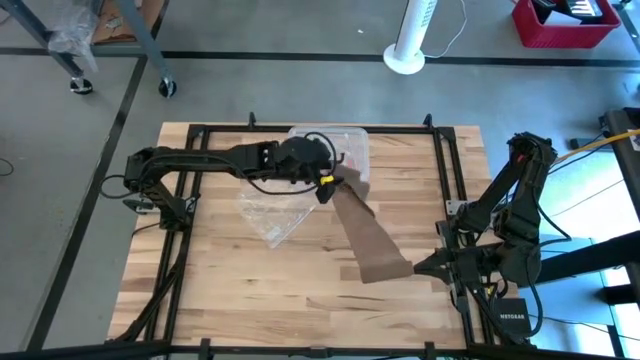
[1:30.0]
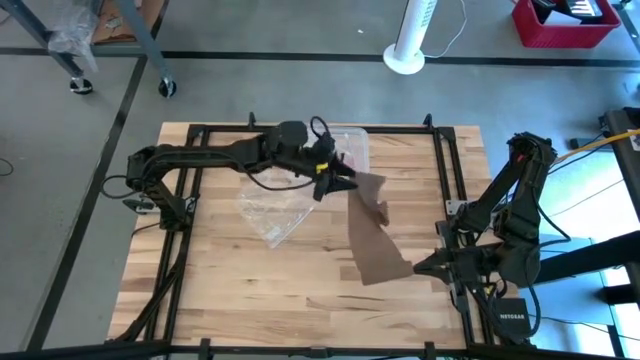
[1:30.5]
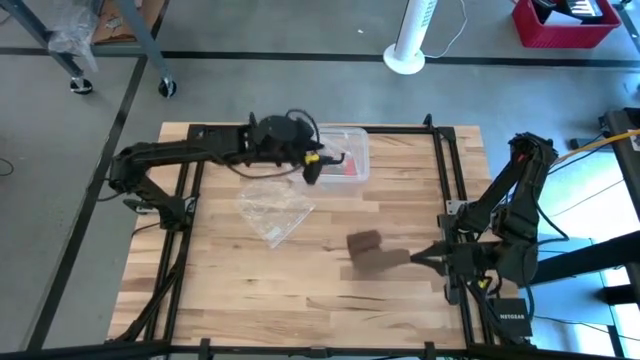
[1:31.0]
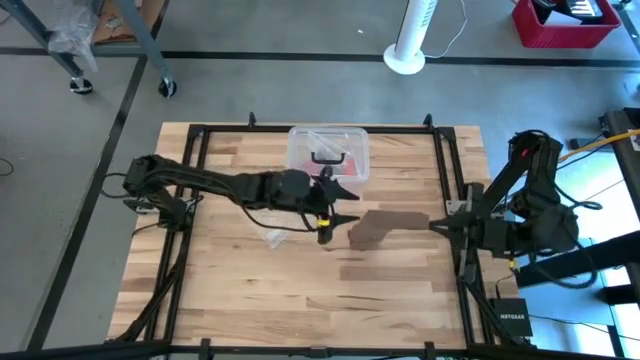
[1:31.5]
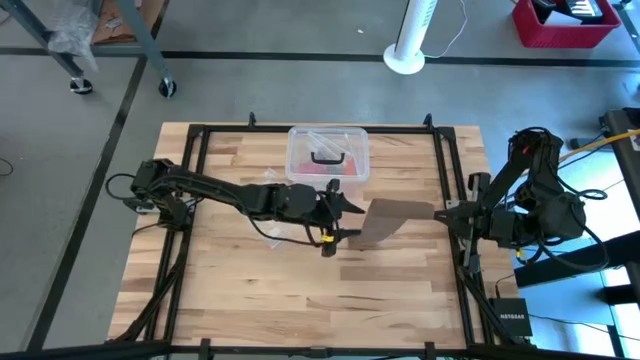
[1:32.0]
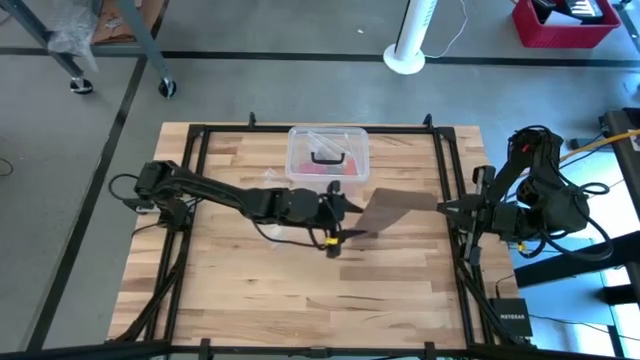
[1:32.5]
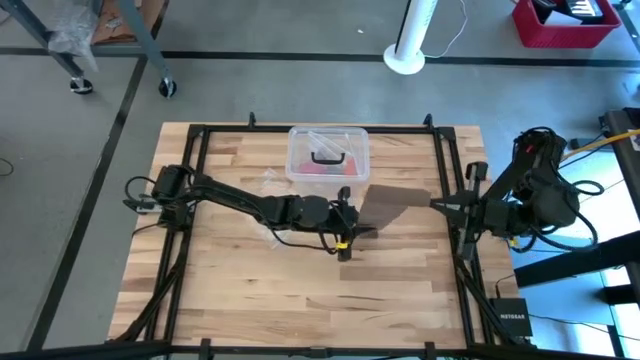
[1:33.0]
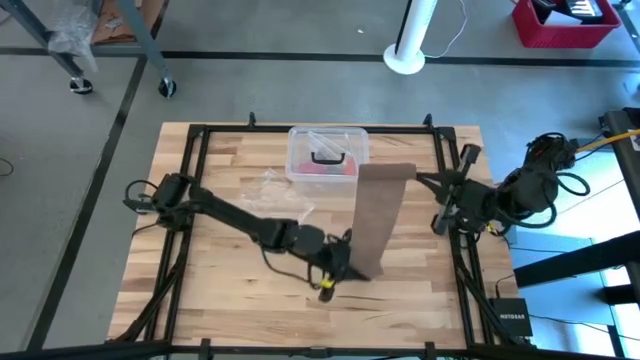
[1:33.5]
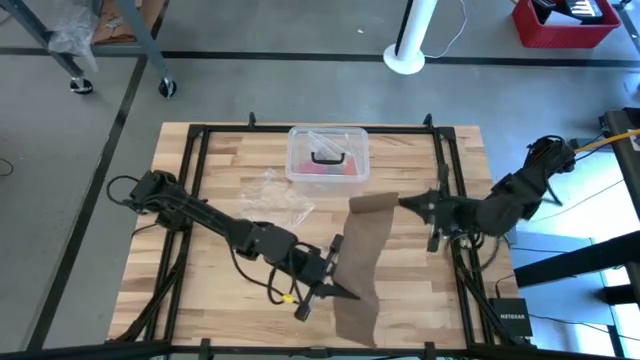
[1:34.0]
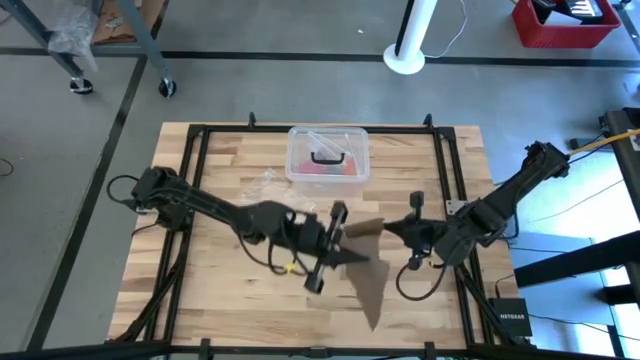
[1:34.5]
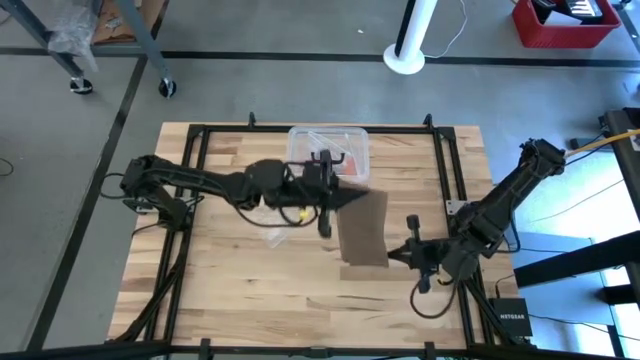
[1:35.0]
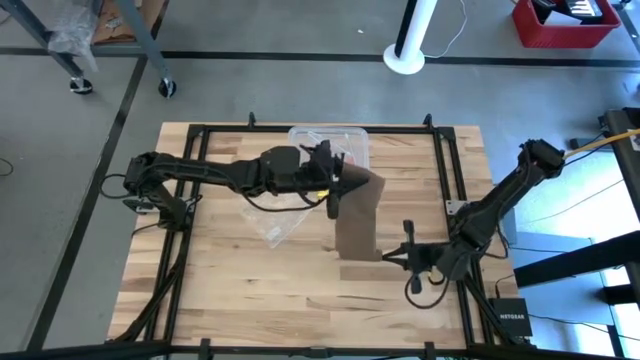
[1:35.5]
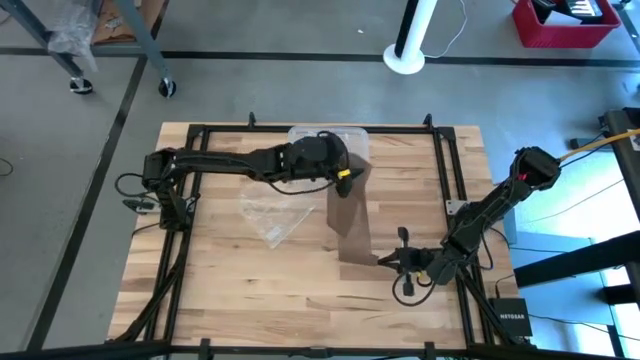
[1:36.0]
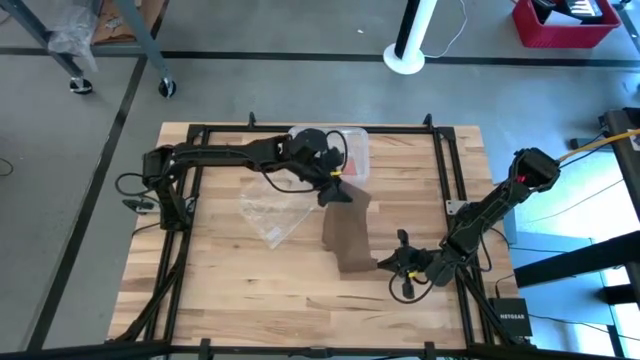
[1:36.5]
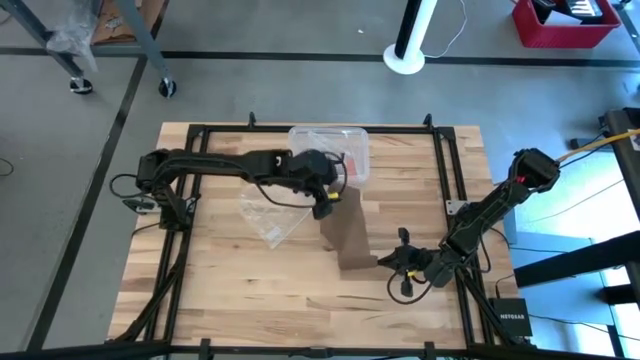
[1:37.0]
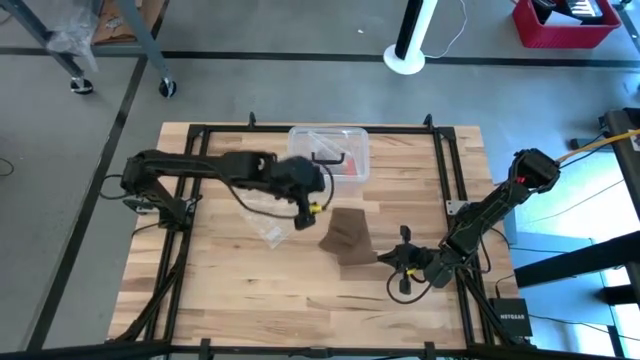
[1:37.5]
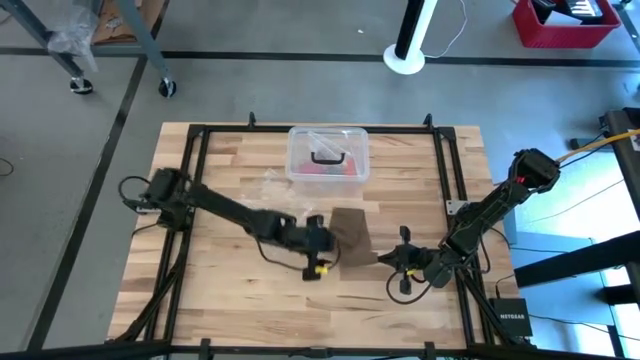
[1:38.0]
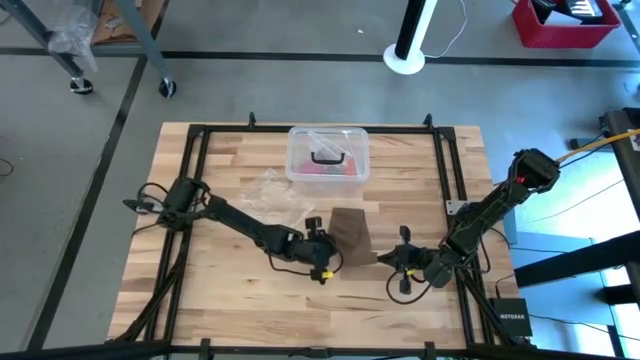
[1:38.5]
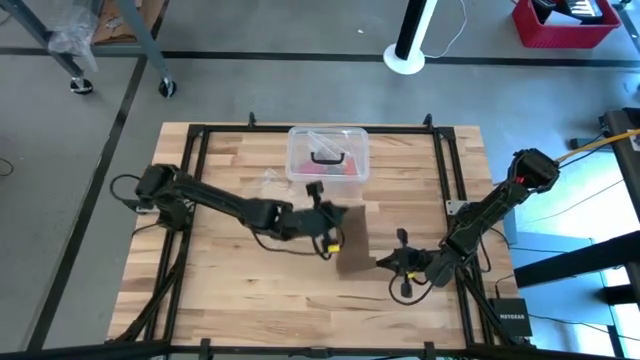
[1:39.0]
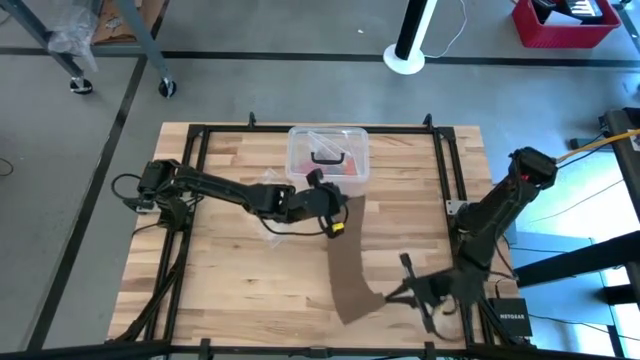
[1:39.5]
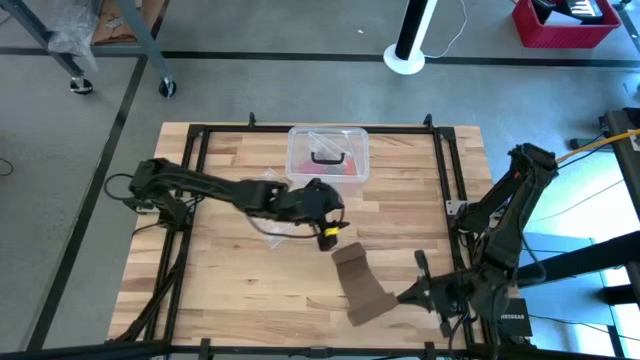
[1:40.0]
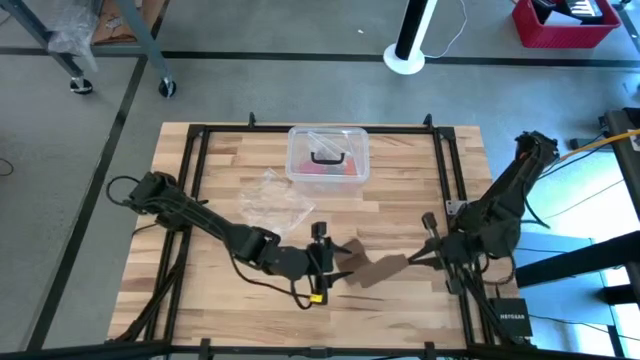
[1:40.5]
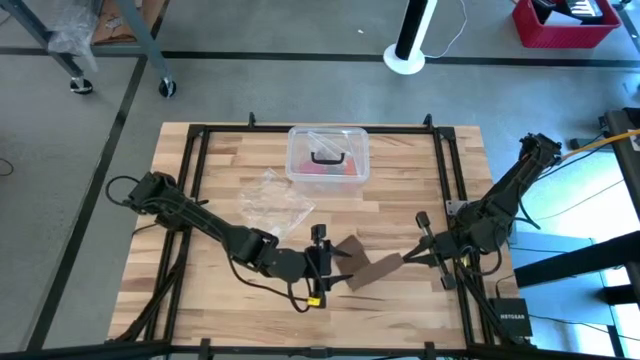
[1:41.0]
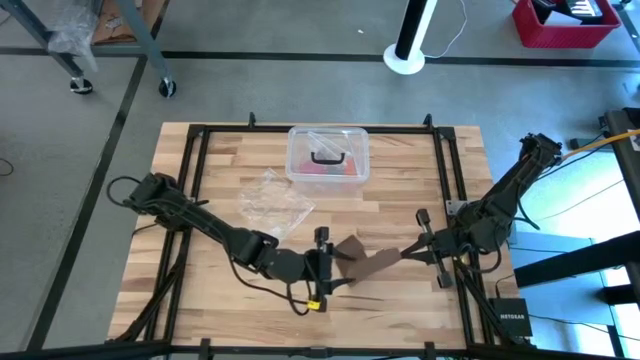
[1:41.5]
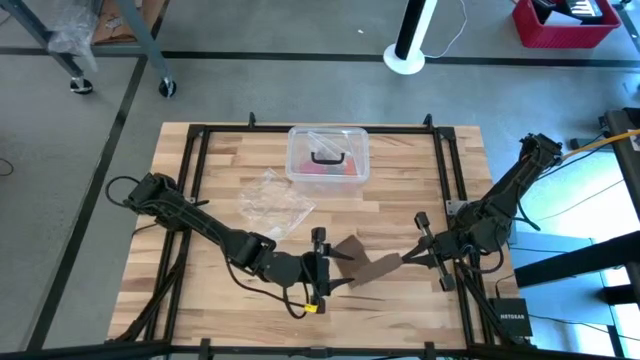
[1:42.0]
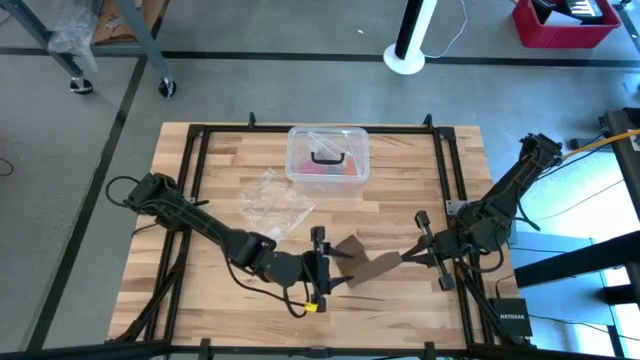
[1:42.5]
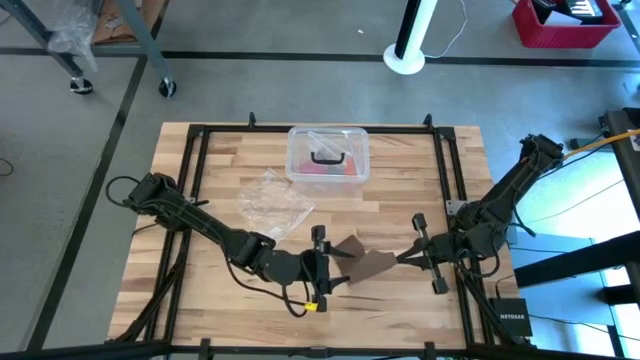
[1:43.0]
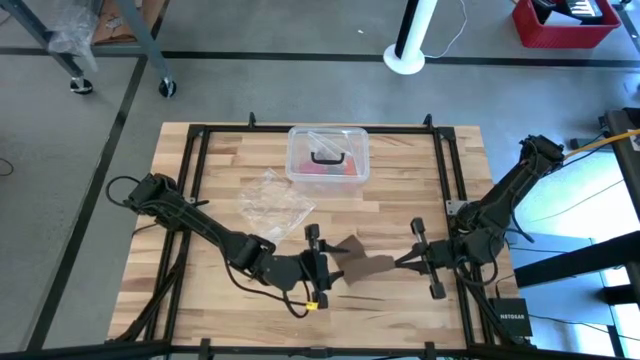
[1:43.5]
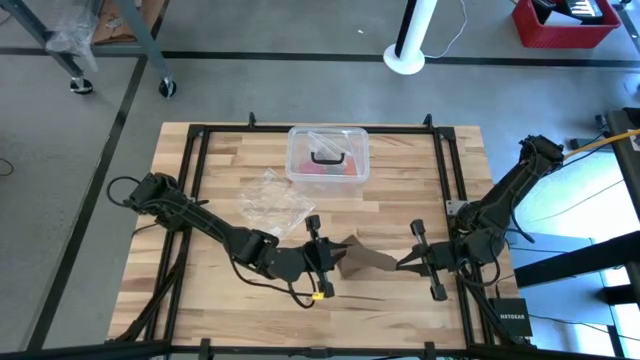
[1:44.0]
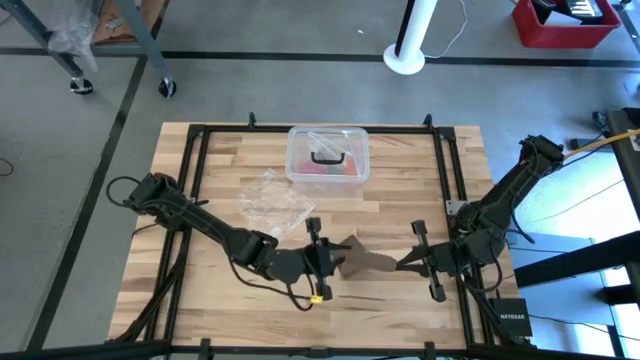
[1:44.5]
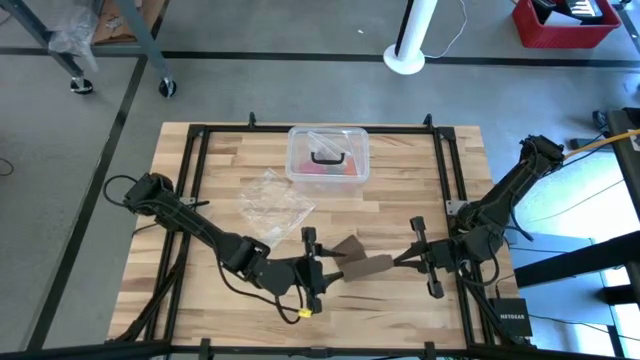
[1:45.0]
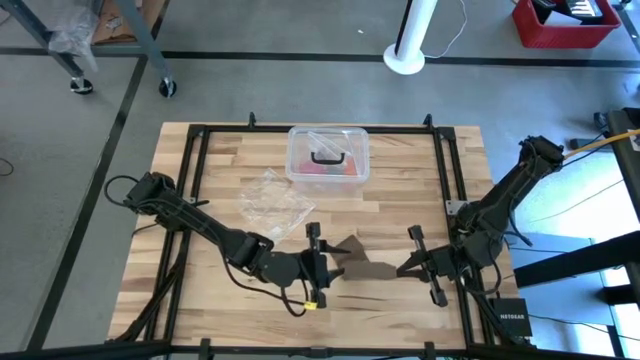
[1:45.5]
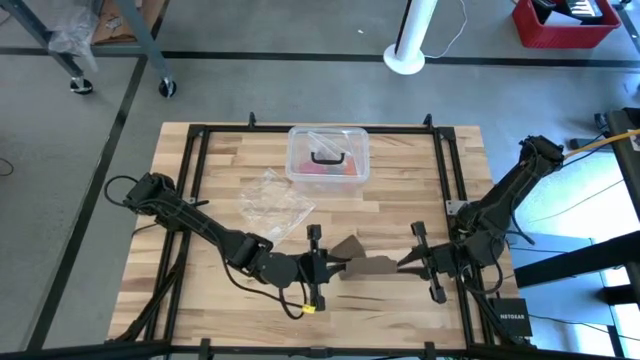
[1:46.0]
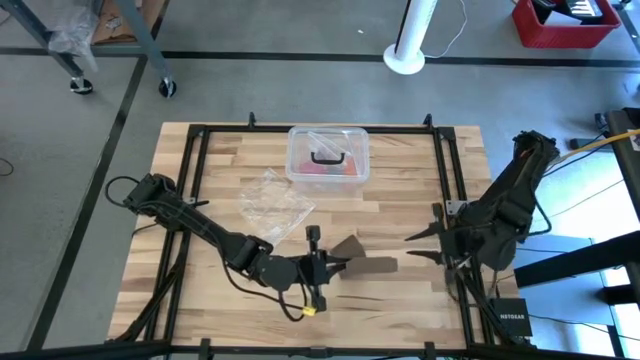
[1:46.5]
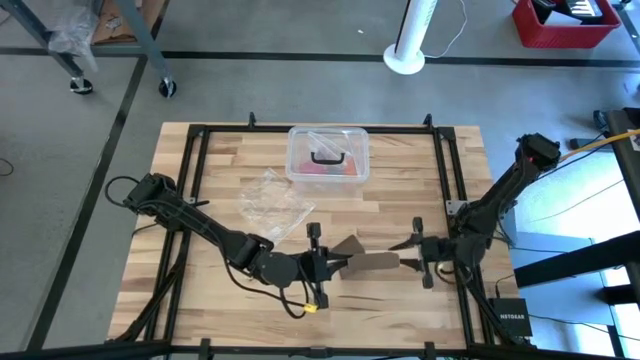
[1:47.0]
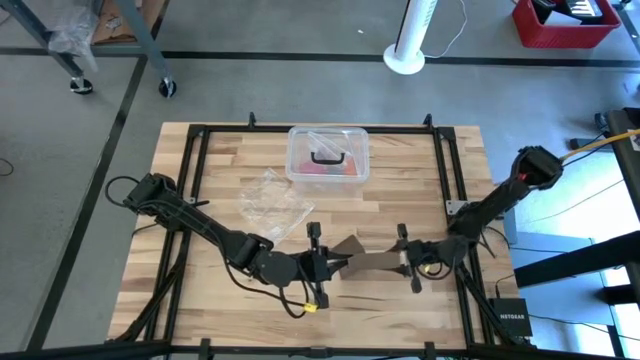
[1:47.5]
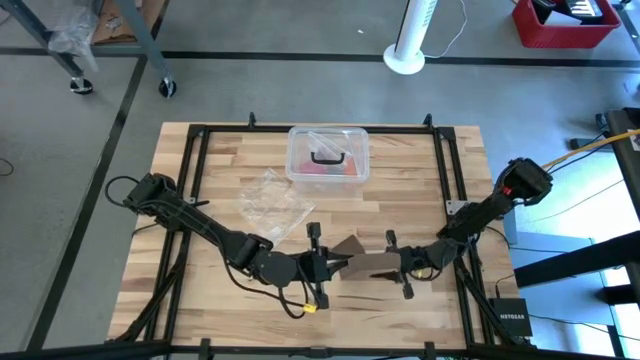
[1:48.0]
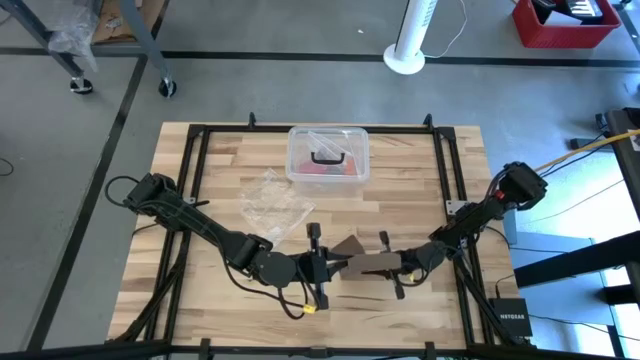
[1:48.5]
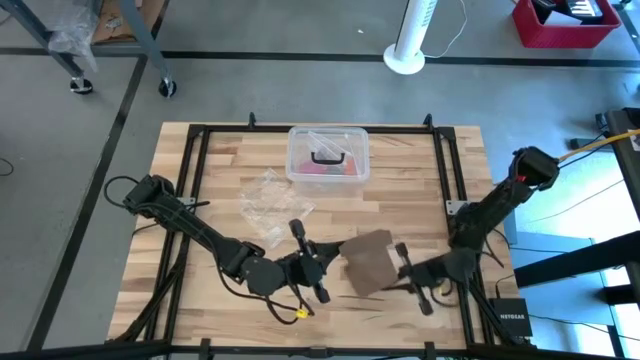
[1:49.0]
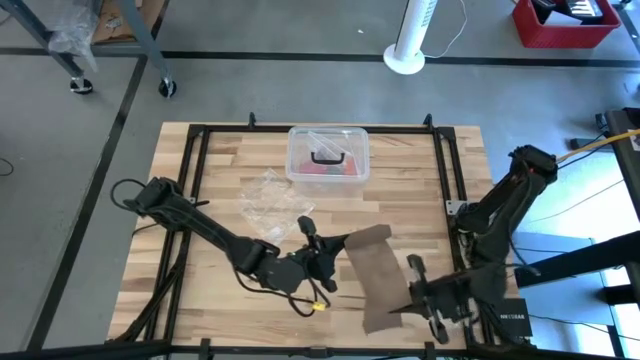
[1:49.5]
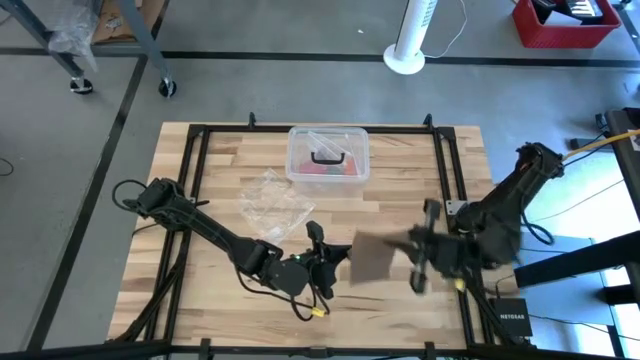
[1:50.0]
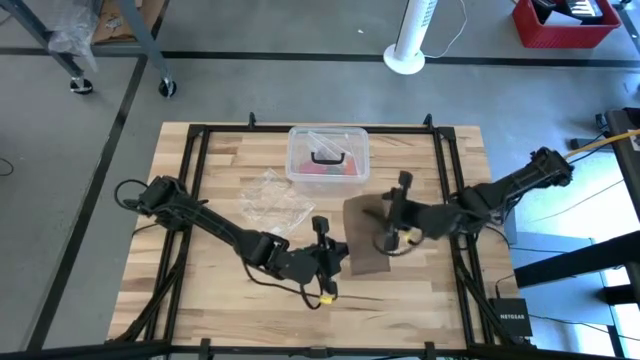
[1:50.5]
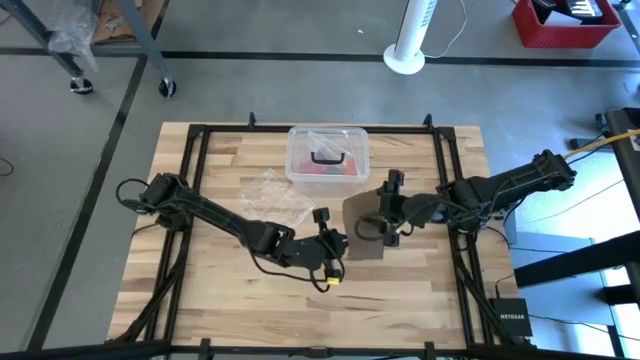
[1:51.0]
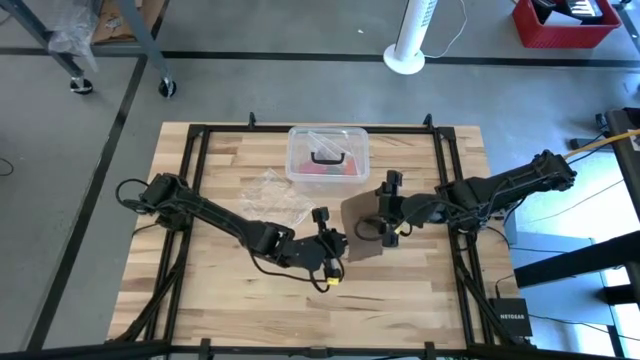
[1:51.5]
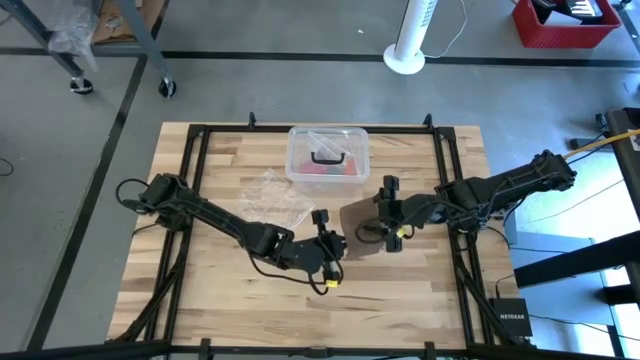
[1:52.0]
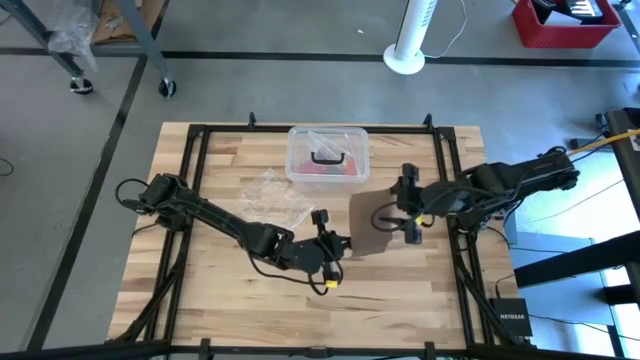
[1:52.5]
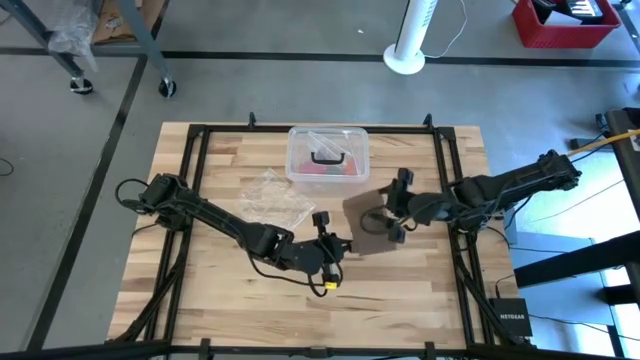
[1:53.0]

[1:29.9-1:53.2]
Task: Roll bandage
Roll the brown bandage
